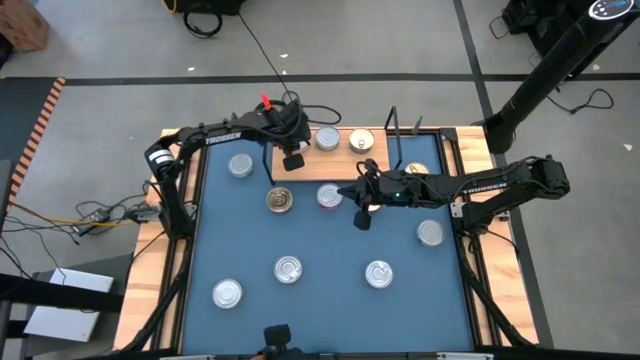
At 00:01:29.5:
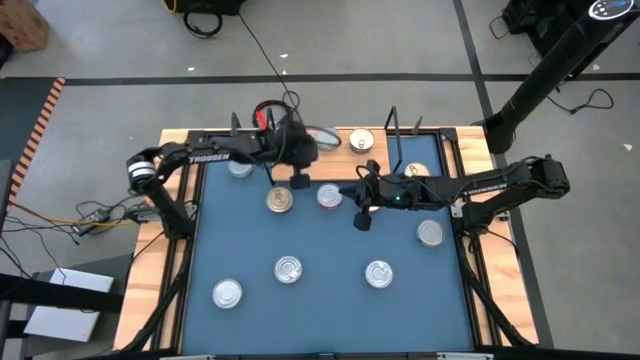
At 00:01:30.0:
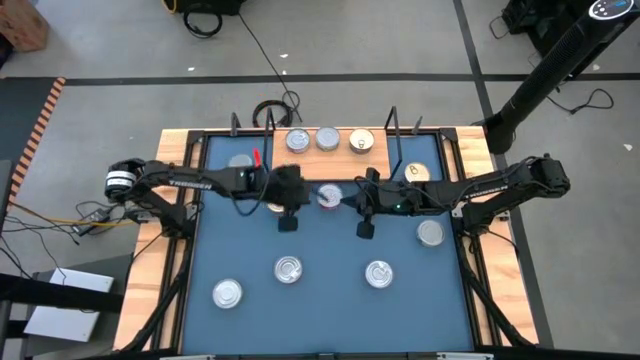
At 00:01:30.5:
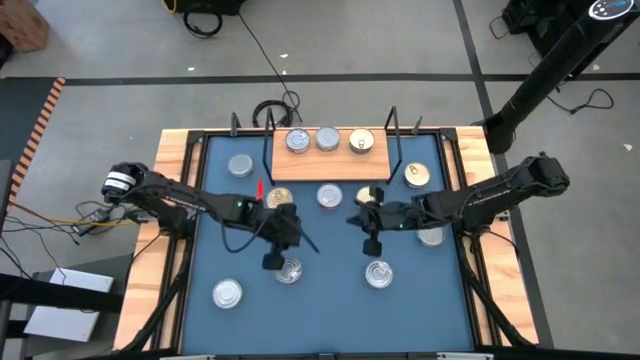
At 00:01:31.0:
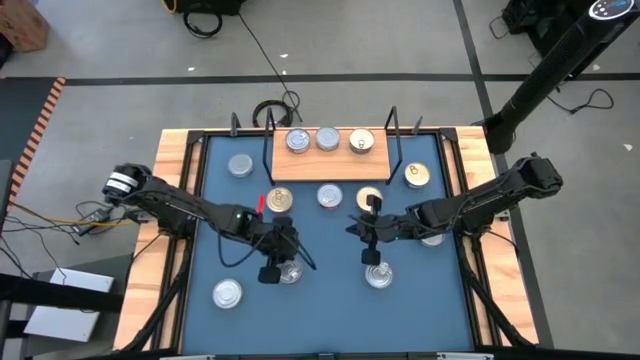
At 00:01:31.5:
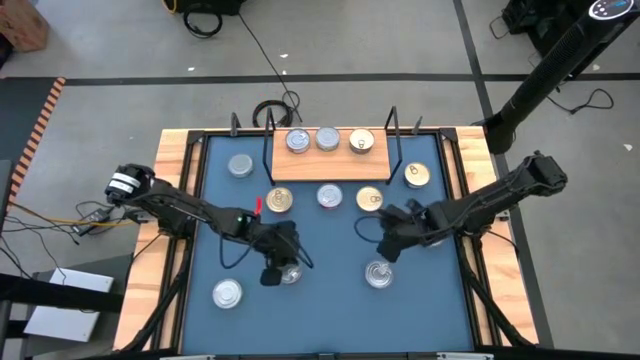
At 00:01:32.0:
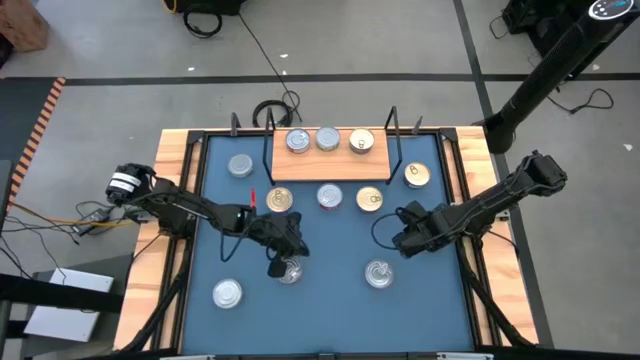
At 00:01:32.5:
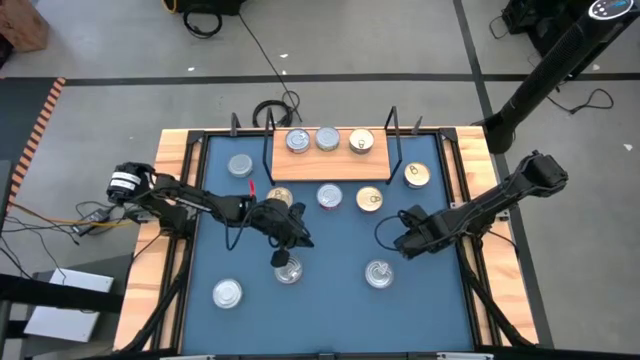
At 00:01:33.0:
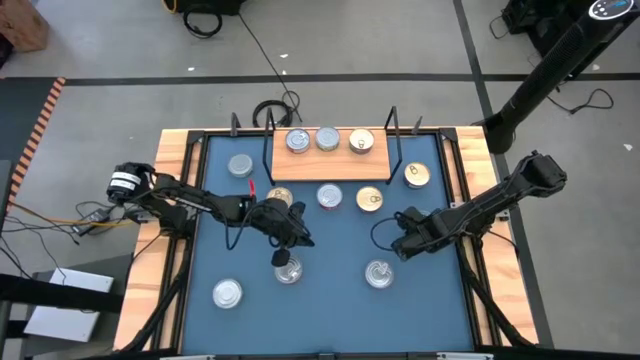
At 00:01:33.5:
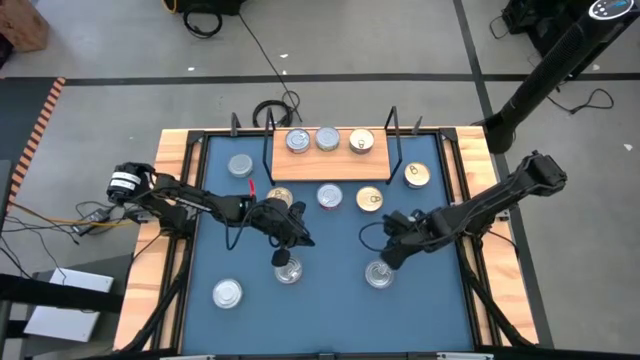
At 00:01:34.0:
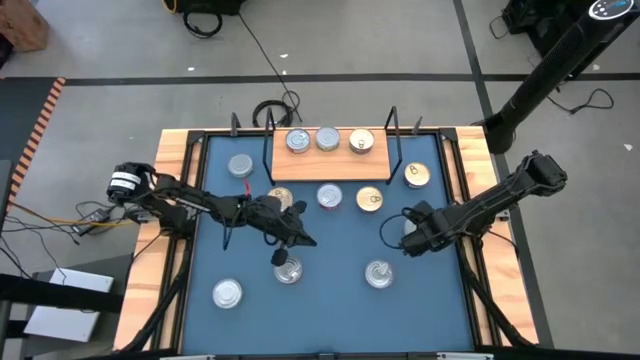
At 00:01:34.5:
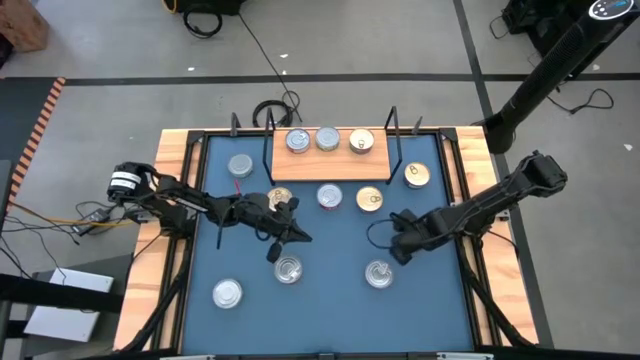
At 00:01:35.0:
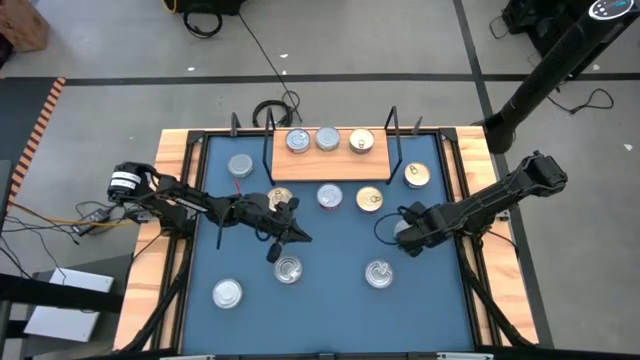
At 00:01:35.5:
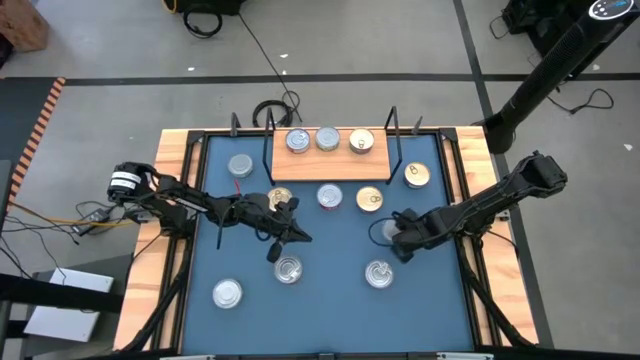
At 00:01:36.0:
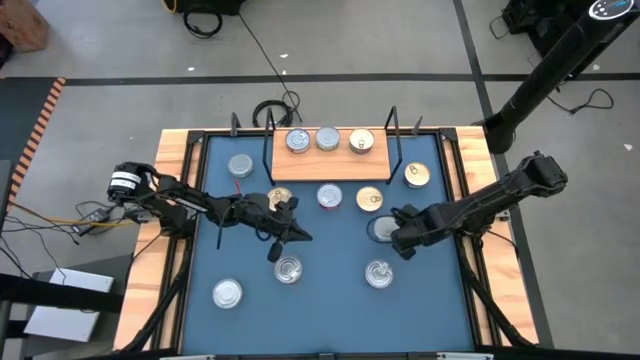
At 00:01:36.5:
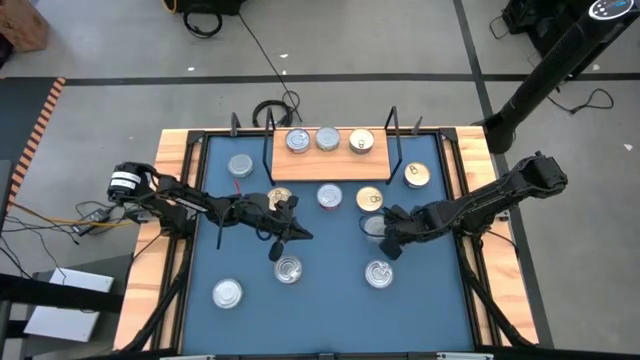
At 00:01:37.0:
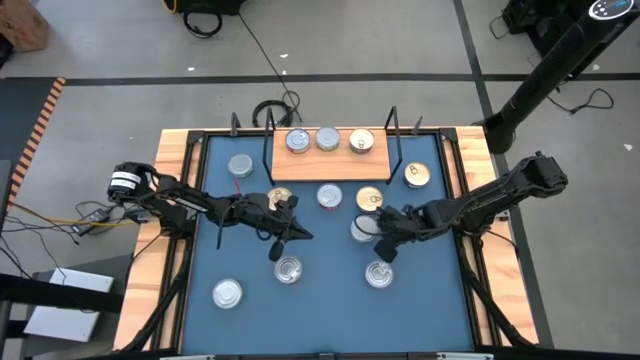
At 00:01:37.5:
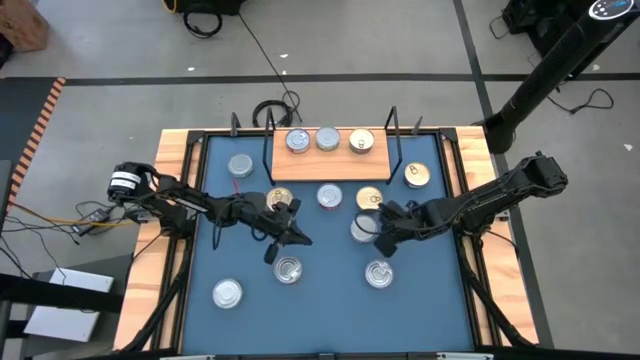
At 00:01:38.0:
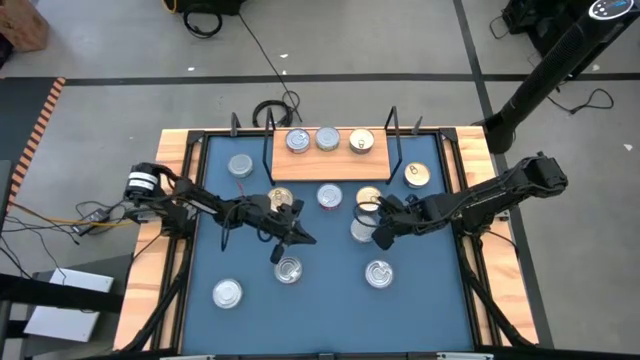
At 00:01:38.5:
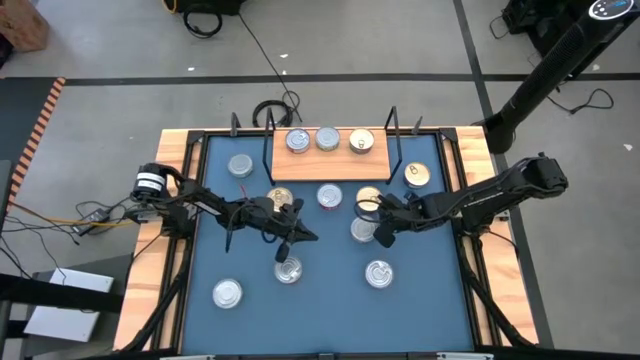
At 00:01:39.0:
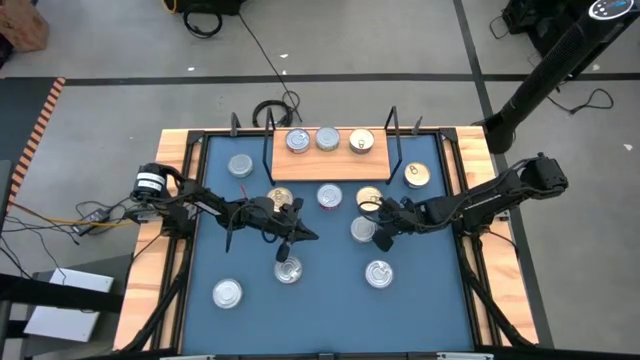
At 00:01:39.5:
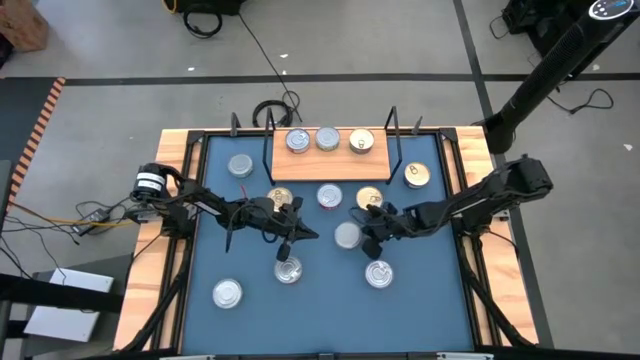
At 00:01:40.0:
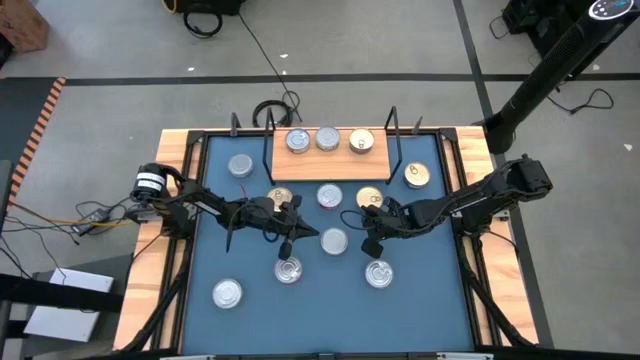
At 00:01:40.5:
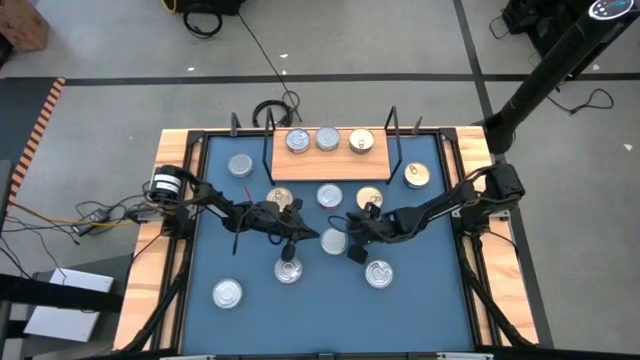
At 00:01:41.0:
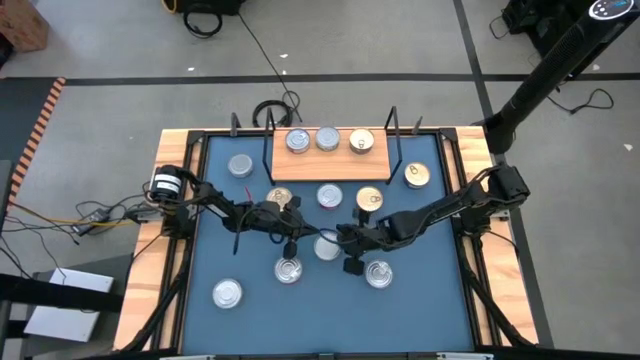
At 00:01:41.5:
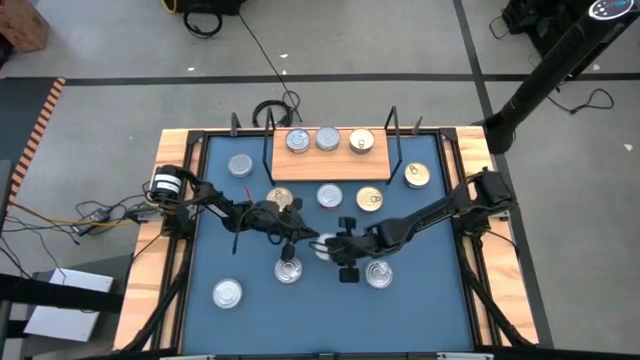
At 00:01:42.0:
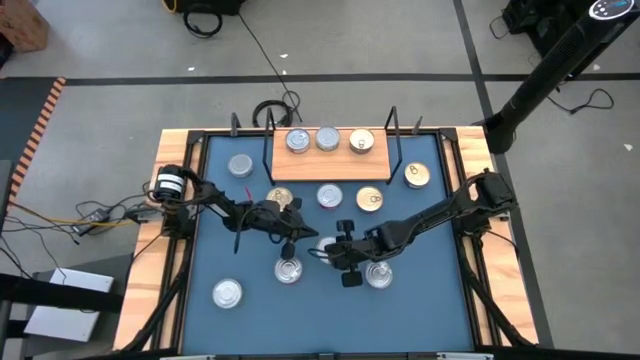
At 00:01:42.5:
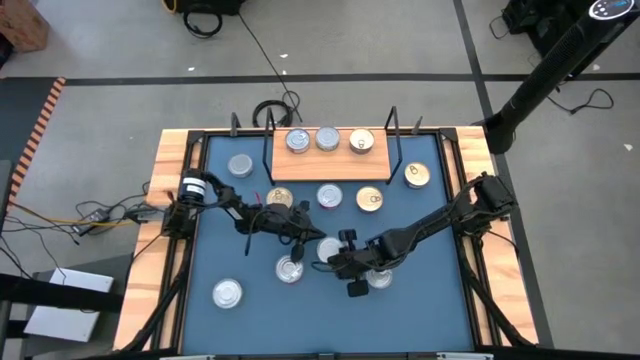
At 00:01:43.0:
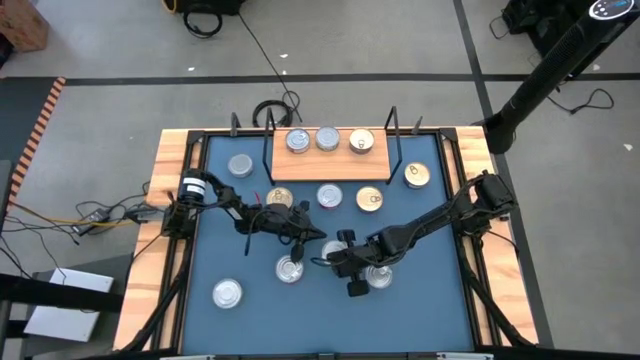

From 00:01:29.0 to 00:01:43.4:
Task: Stack canned seafood by type on shelf
Stack the green tuna can on top of the other green tuna can on the shelf

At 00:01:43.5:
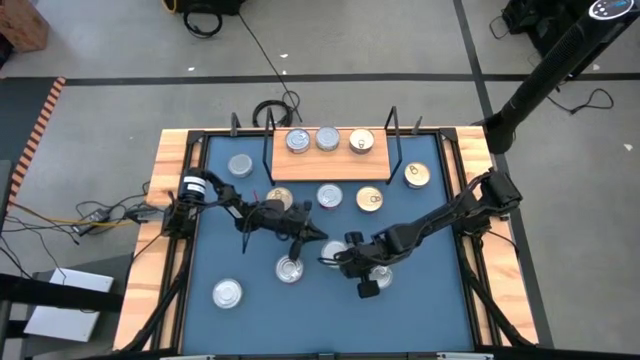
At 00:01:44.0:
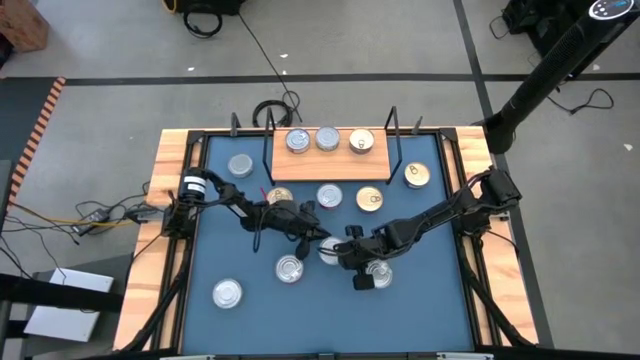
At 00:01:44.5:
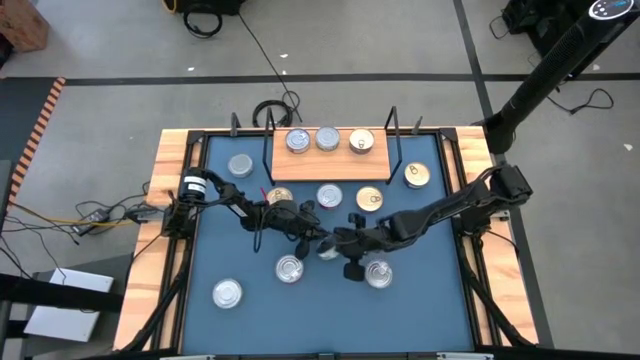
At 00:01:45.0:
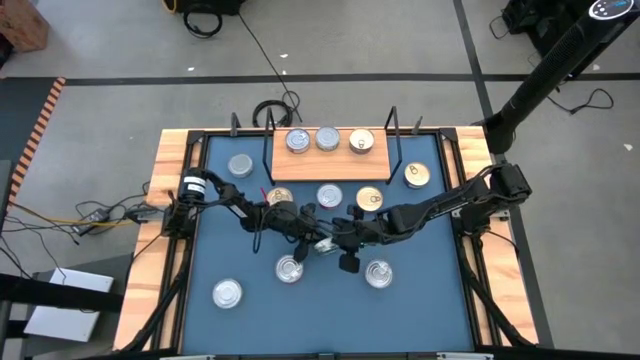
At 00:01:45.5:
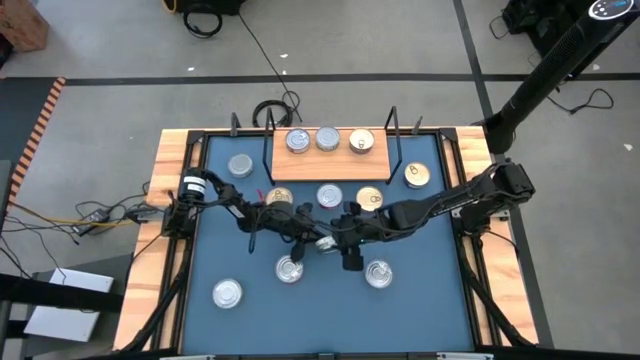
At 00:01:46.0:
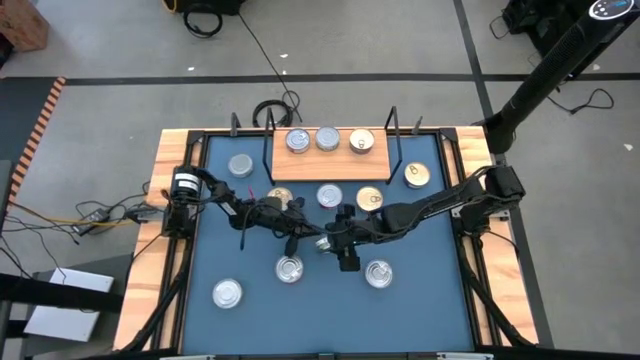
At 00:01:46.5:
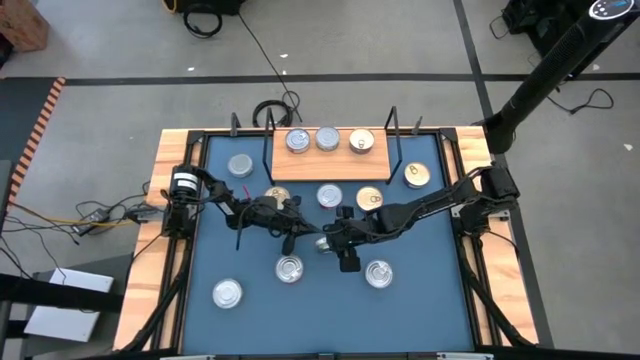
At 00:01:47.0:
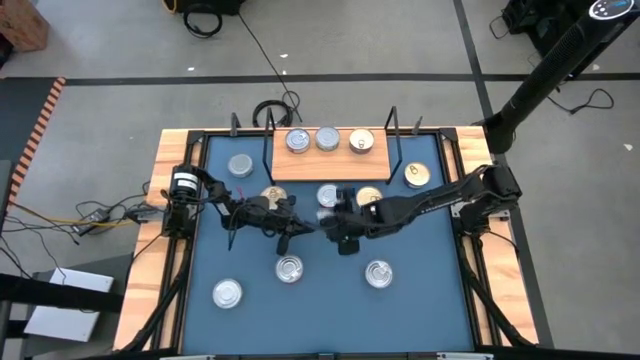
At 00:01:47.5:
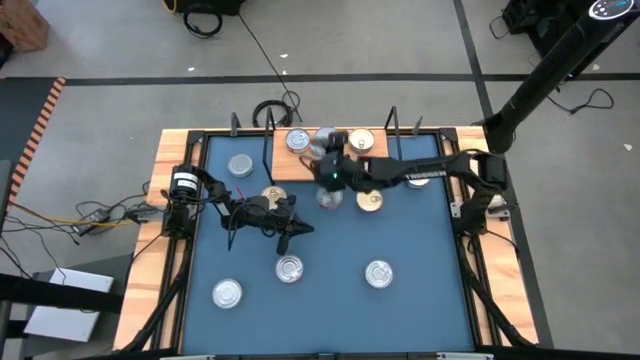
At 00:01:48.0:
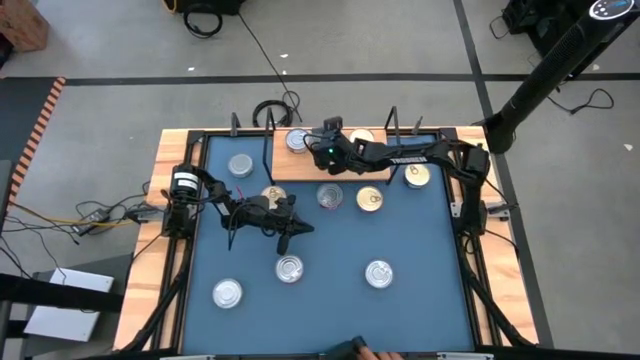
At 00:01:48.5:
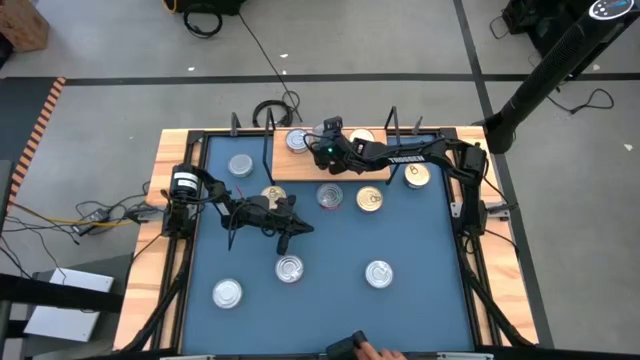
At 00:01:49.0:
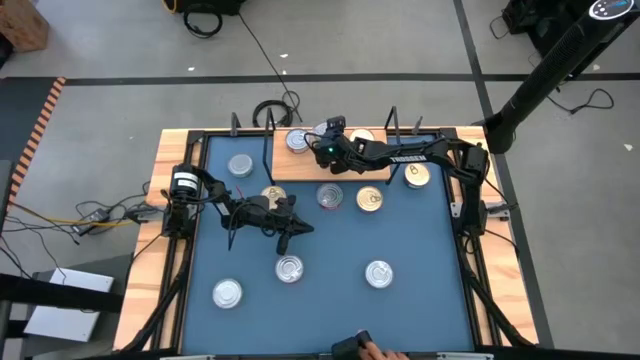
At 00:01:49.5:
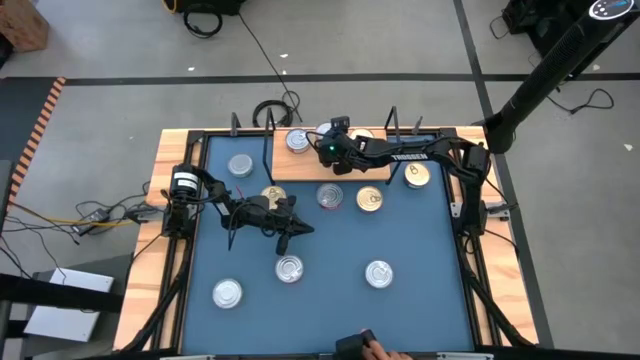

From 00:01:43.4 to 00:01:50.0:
Stack the green tuna can on top of the other green tuna can on the shelf
